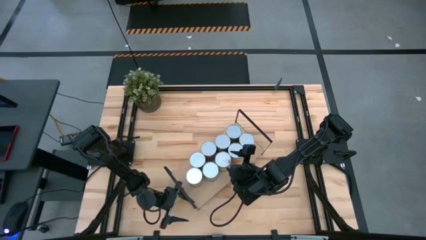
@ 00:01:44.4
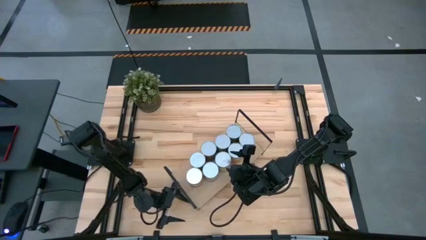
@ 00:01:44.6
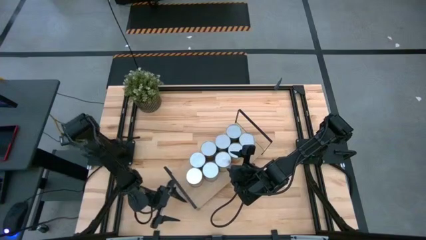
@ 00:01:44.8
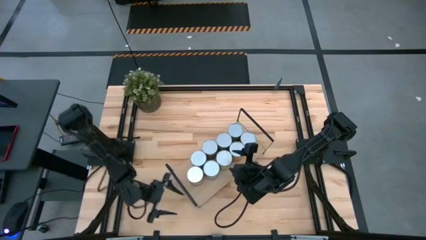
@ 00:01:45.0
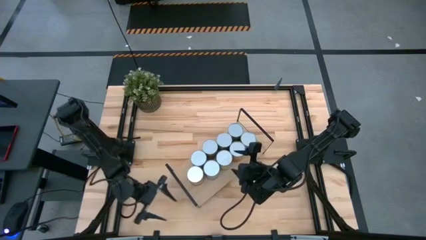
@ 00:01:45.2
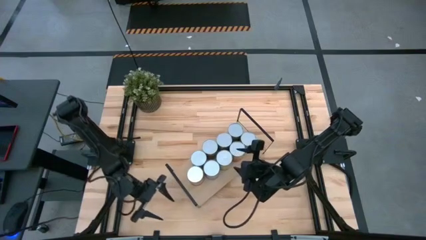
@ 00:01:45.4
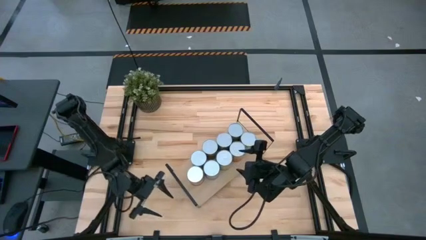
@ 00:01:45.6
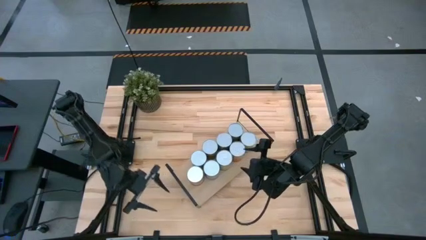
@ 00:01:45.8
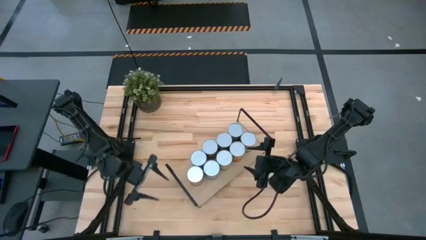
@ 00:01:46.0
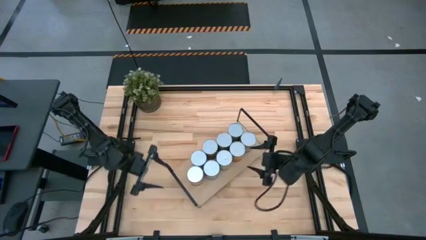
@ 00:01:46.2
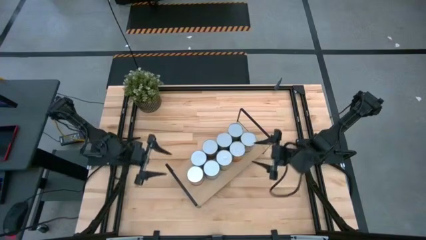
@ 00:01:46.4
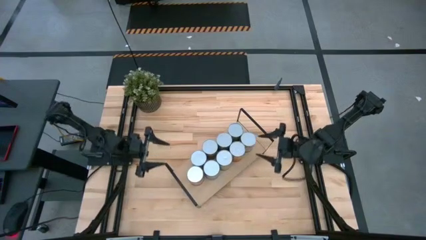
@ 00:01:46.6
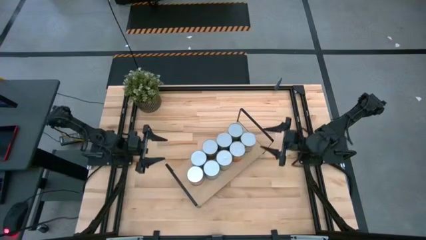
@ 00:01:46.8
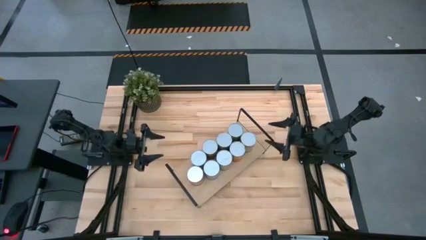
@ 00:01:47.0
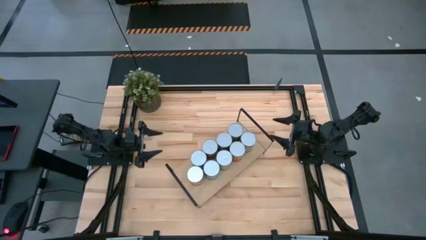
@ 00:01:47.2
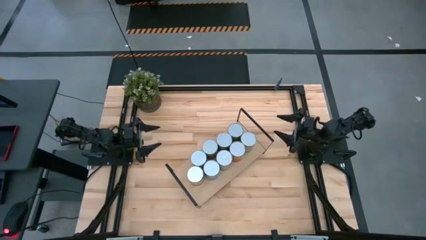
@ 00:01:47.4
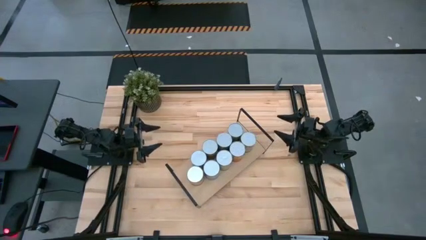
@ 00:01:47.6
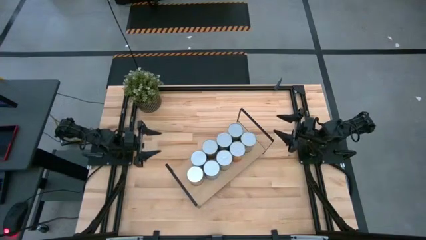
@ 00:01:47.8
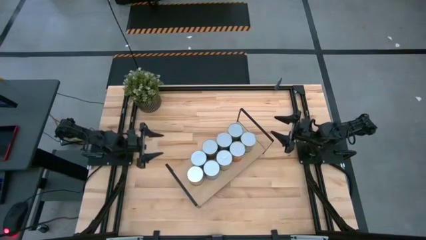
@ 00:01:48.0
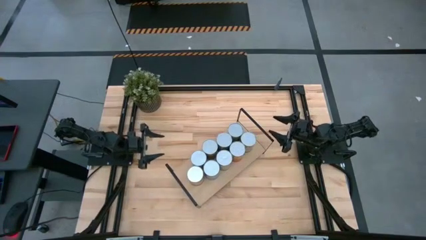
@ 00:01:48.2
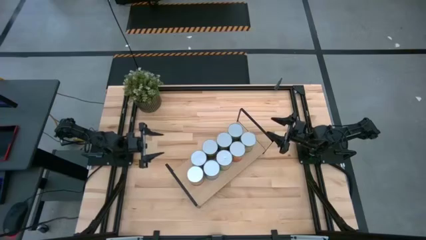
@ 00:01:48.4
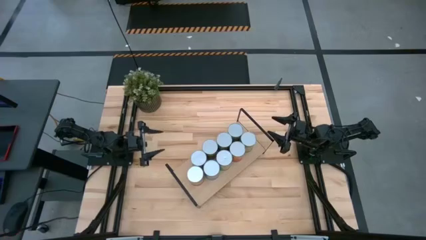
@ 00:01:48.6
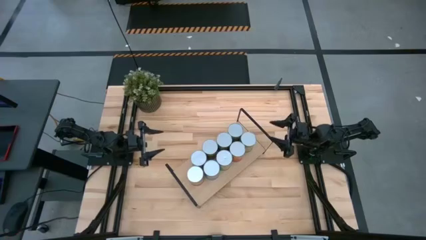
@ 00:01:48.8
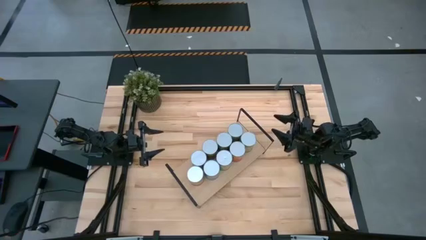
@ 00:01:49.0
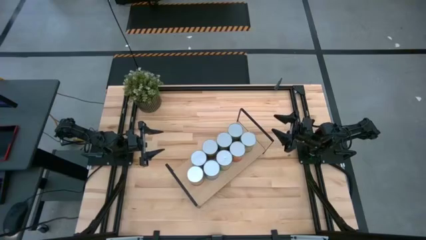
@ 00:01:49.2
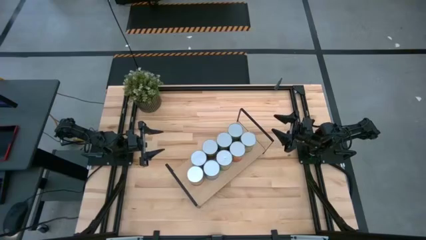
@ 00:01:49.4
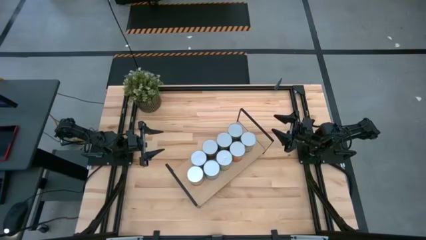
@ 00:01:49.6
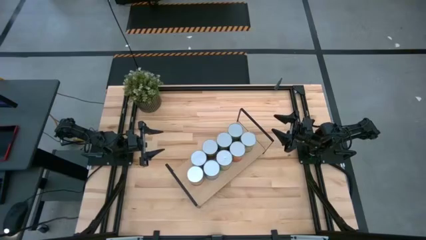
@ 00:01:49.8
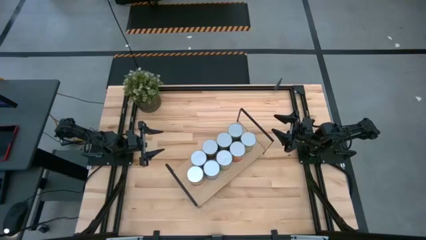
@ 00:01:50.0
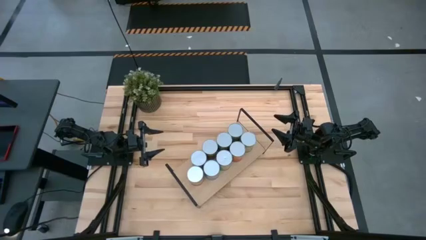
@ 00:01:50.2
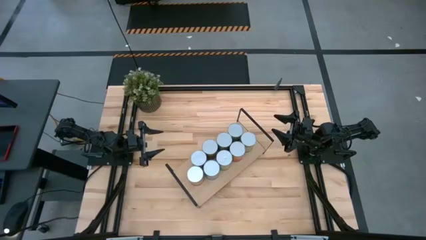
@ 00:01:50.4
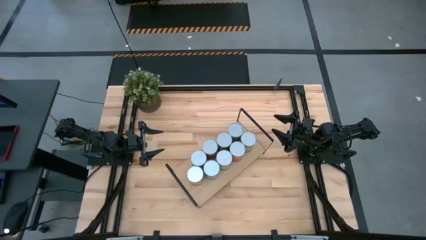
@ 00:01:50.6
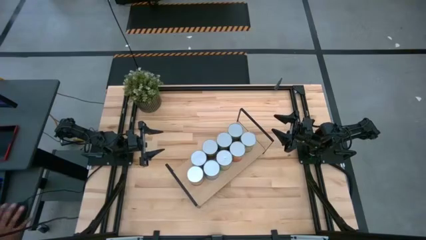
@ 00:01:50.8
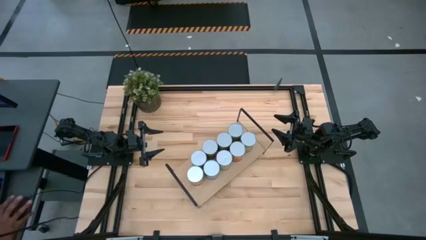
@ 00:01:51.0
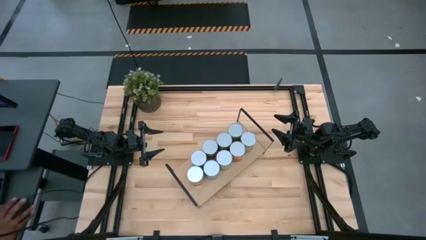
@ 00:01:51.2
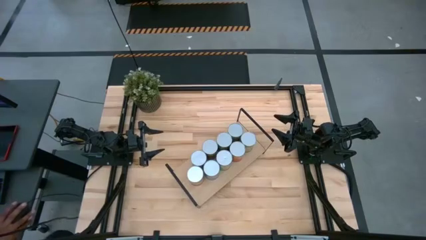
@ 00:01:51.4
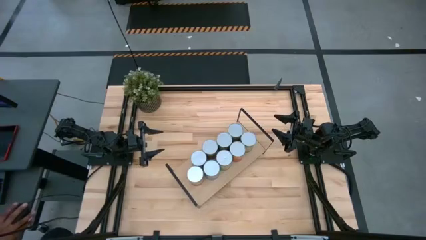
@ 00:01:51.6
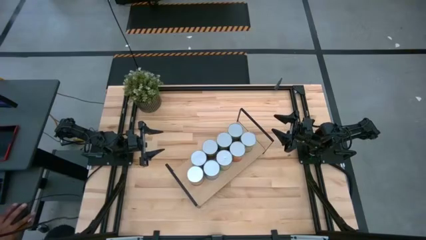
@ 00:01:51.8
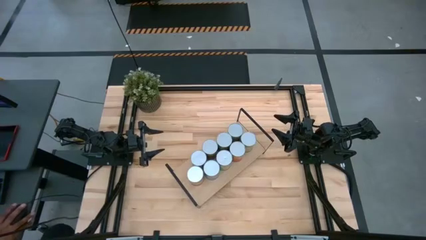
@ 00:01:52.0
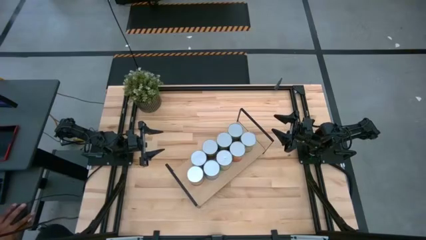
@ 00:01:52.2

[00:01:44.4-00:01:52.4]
Task: Pick and place cans onto a shelf
Return to Home Position

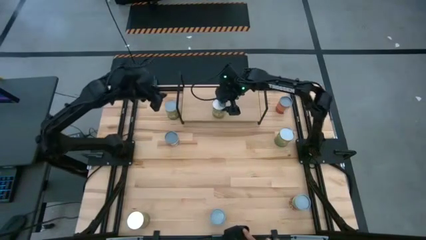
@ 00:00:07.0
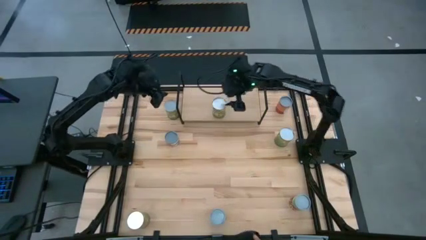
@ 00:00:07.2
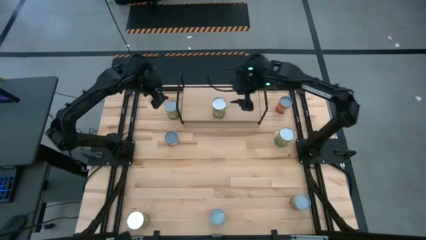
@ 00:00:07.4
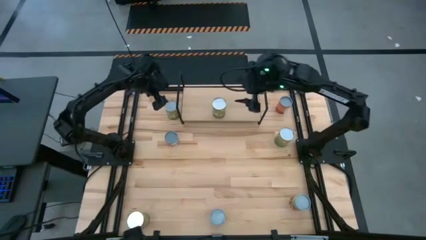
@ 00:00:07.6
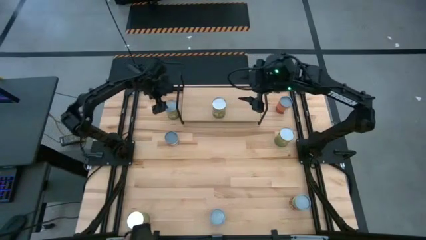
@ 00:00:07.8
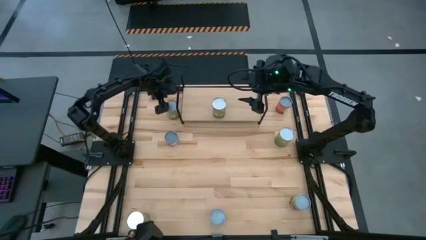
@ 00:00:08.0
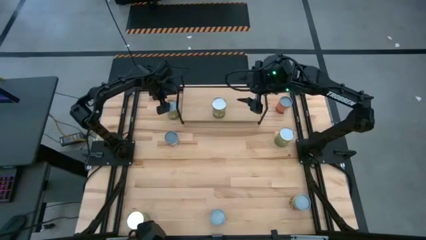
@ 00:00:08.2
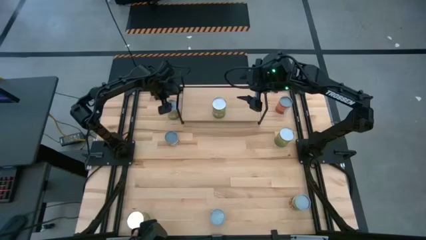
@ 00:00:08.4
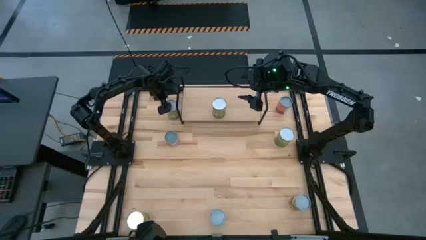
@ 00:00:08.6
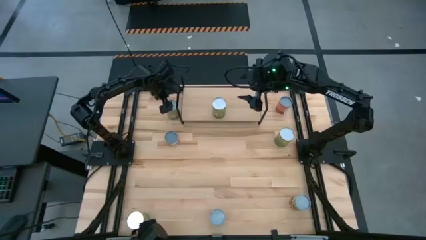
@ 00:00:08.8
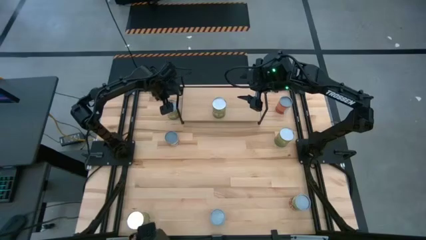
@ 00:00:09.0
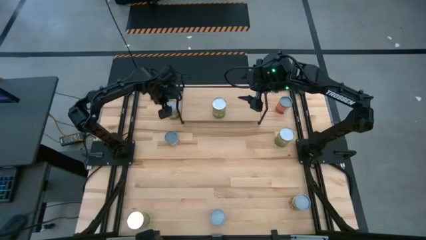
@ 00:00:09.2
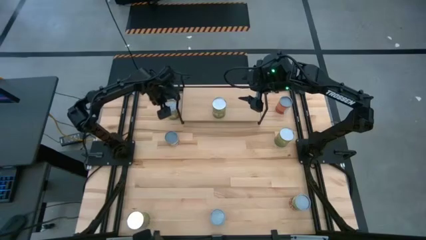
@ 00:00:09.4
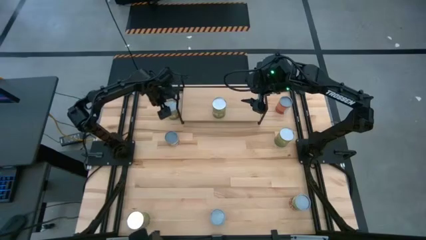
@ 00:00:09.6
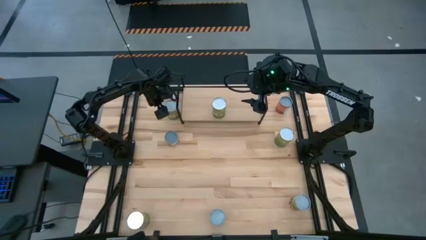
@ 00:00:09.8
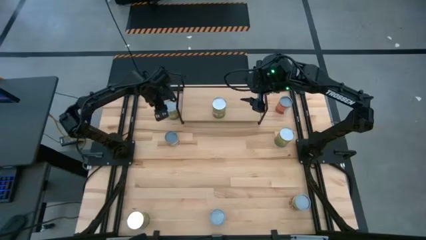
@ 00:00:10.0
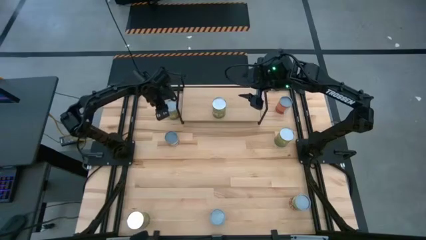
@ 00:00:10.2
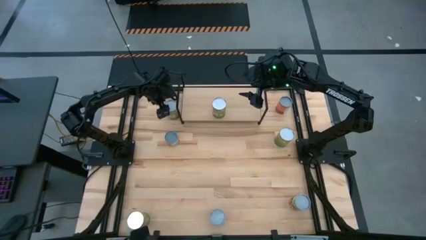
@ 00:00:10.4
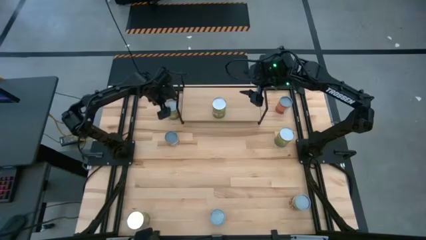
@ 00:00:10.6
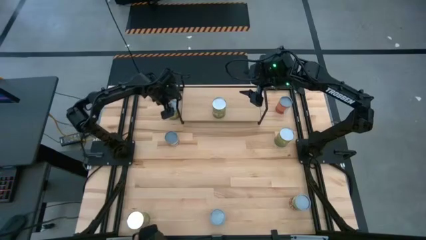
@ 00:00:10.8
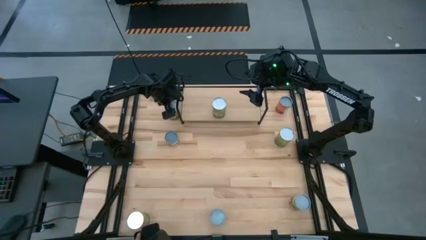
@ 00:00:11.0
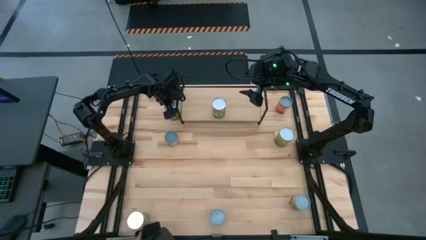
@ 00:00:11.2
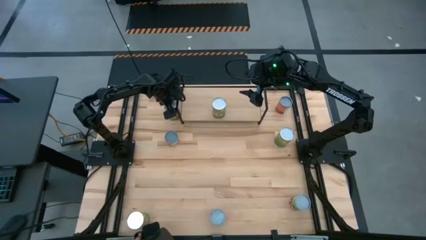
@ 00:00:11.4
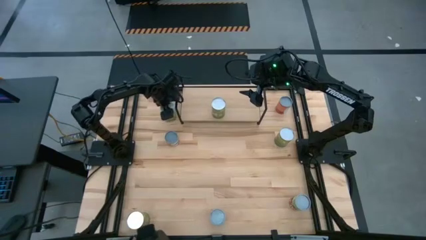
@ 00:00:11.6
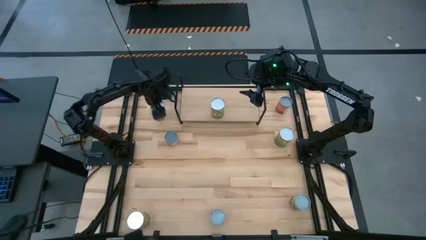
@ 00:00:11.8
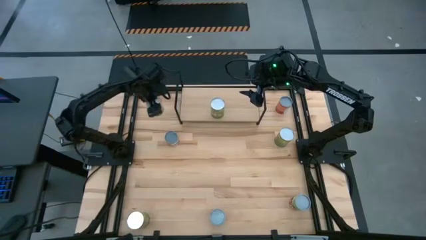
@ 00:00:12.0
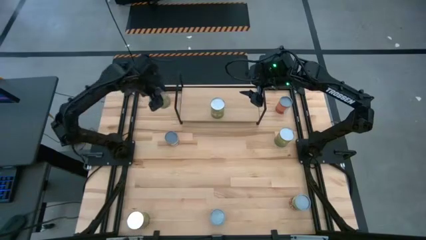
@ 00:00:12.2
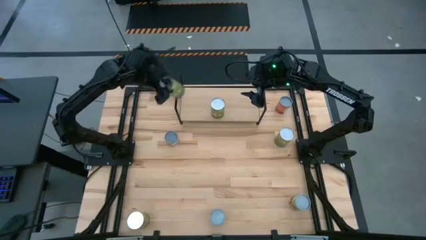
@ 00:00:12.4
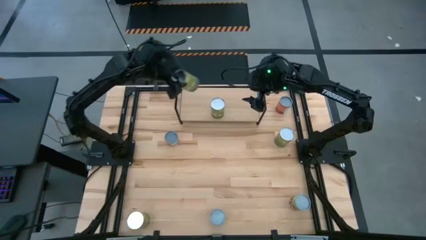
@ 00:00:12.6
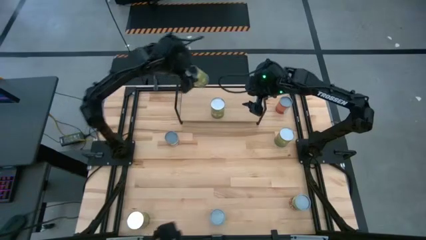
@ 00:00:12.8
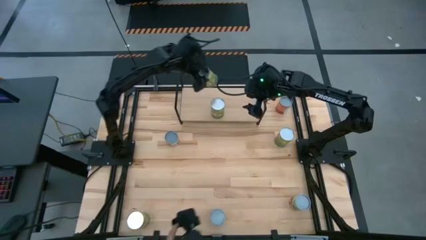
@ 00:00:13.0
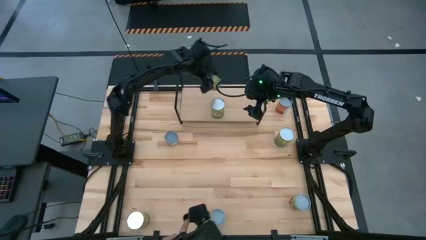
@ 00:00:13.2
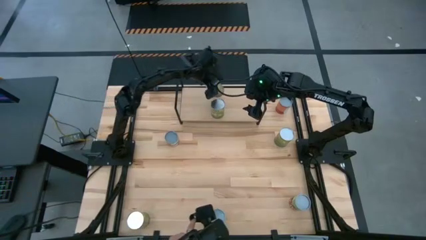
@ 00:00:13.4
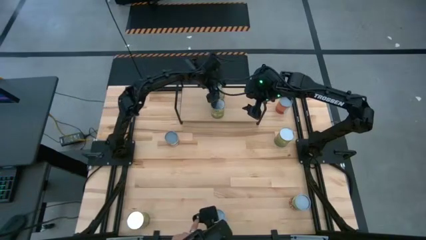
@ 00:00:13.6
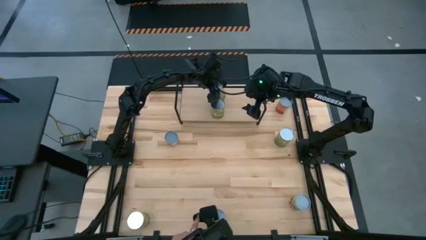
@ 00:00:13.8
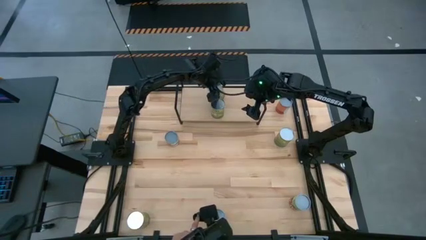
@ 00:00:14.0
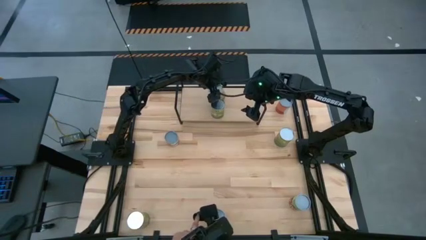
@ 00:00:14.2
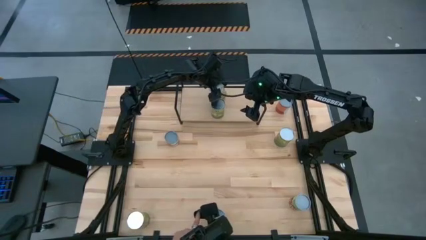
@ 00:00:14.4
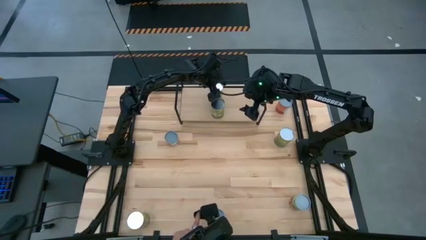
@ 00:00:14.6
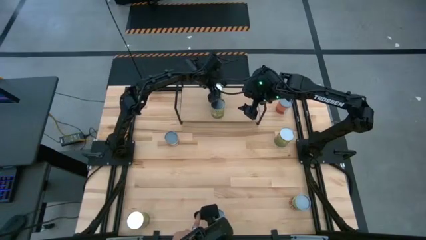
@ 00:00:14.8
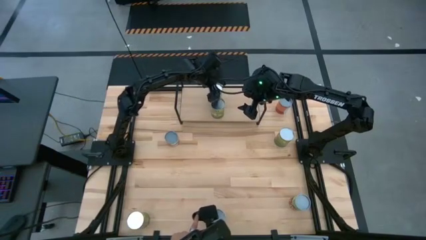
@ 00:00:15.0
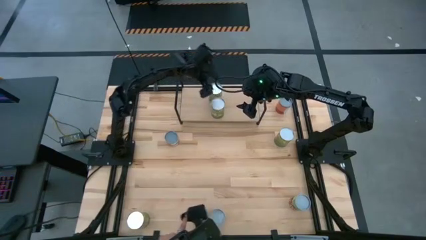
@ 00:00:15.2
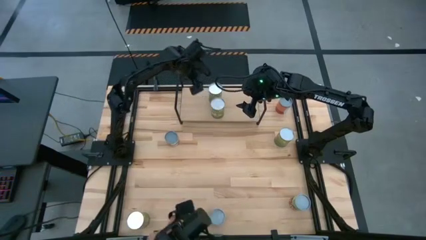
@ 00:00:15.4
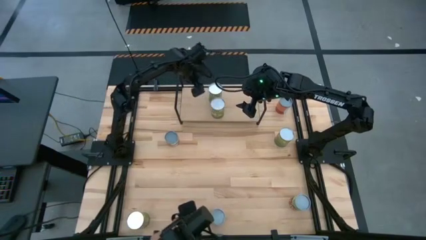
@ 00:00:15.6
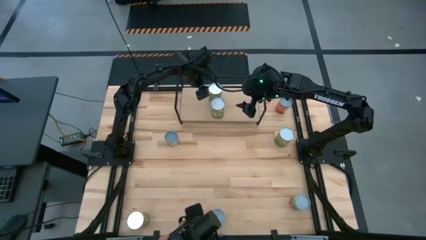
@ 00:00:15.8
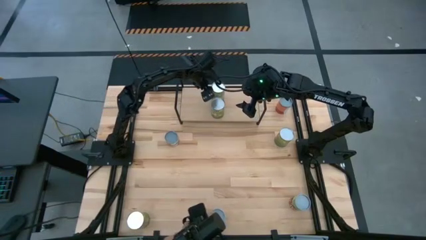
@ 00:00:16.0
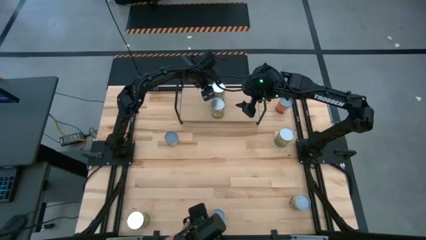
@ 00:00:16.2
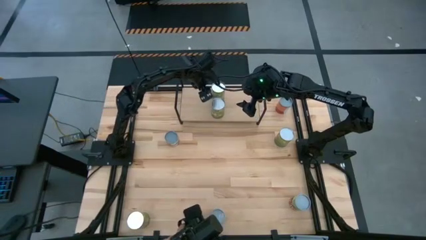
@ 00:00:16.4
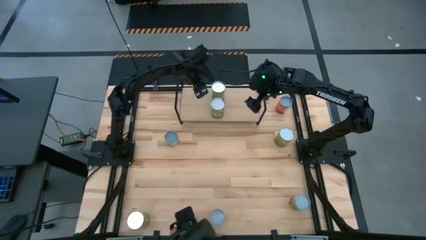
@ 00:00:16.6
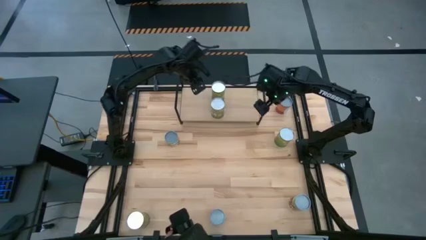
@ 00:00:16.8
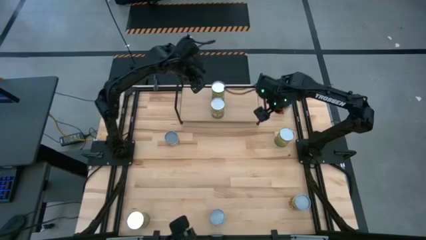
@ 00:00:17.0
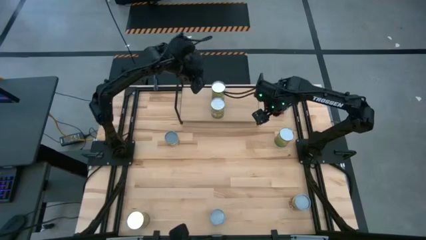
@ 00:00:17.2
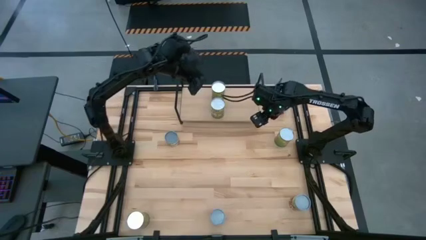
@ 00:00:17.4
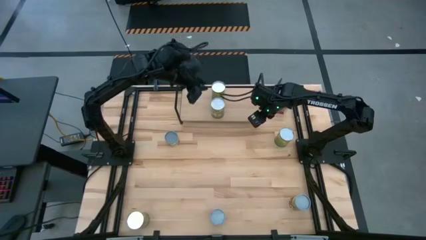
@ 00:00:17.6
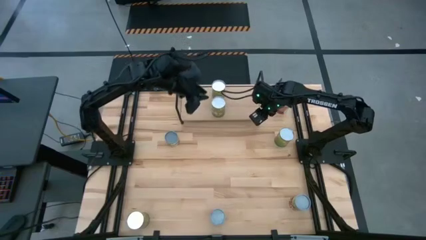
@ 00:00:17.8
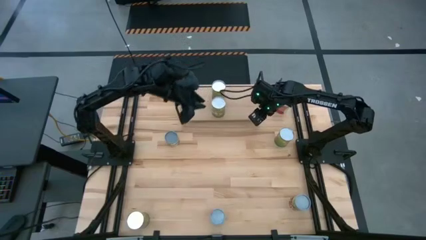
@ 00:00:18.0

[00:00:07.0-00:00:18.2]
Task: Pick and place cans onto a shelf
Put the canned pears on the shelf aligned with the other canned pears
